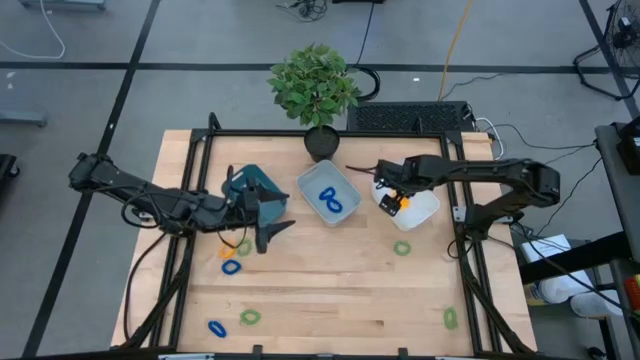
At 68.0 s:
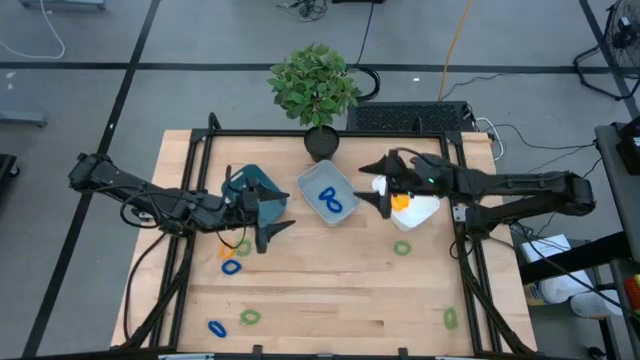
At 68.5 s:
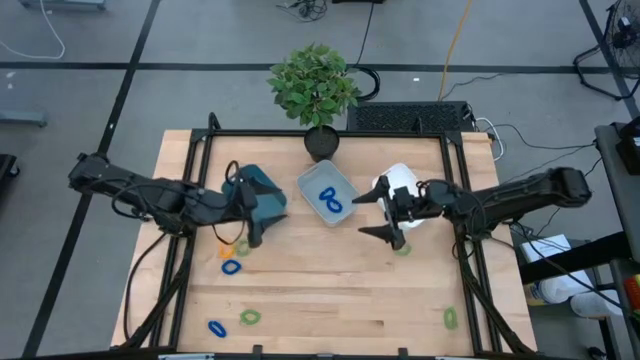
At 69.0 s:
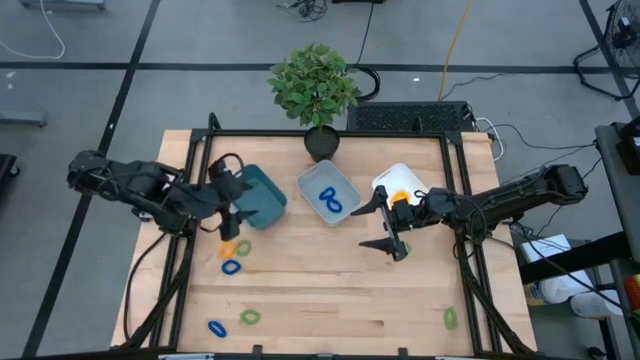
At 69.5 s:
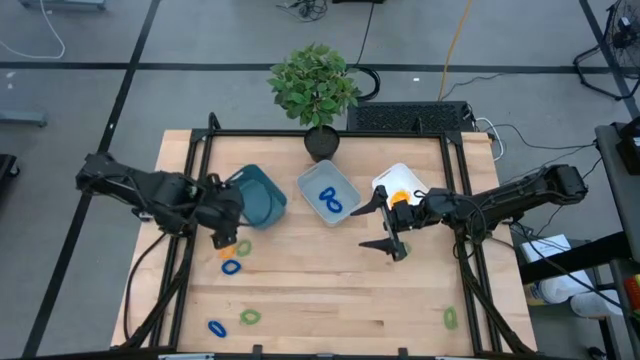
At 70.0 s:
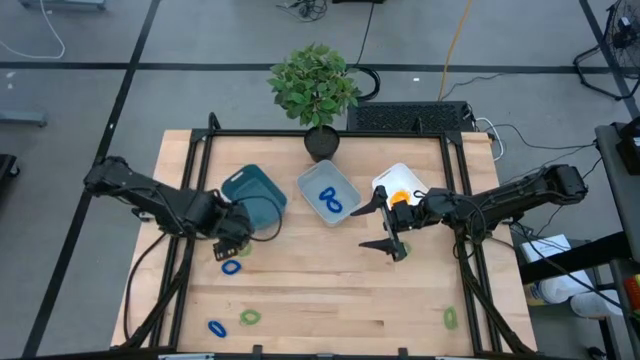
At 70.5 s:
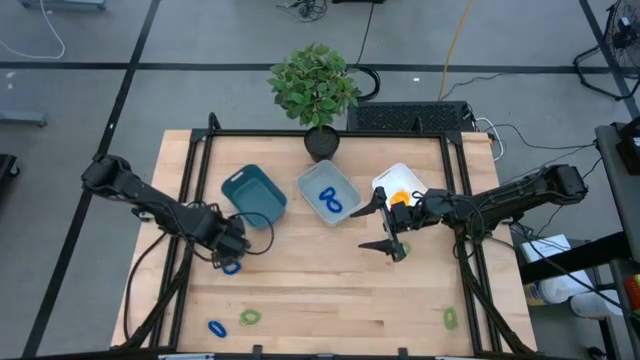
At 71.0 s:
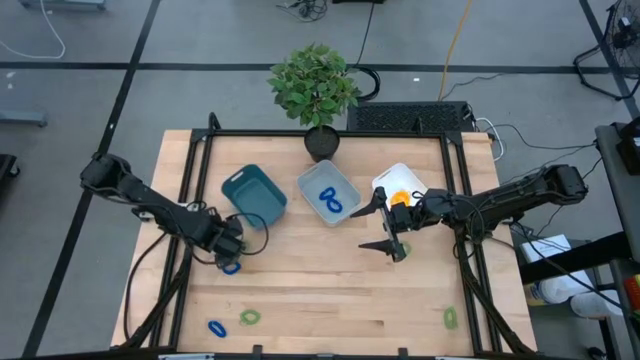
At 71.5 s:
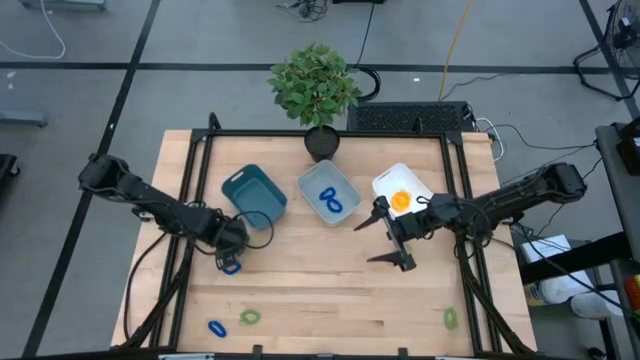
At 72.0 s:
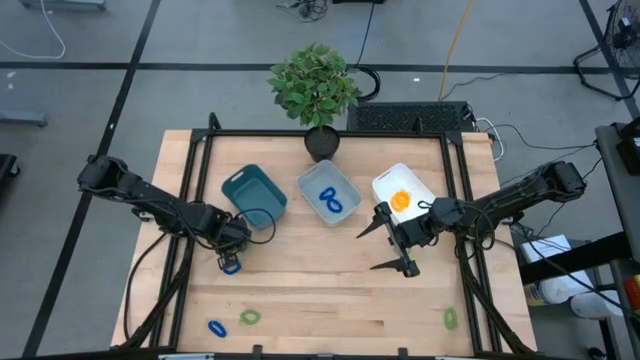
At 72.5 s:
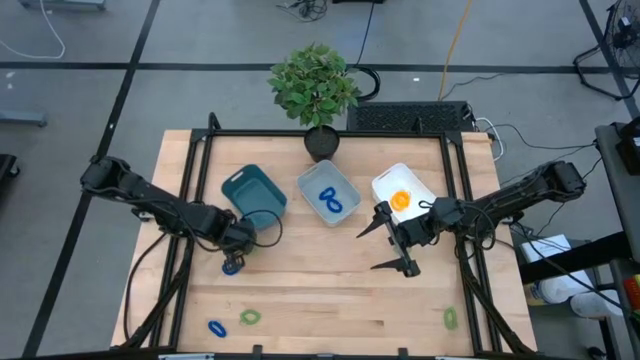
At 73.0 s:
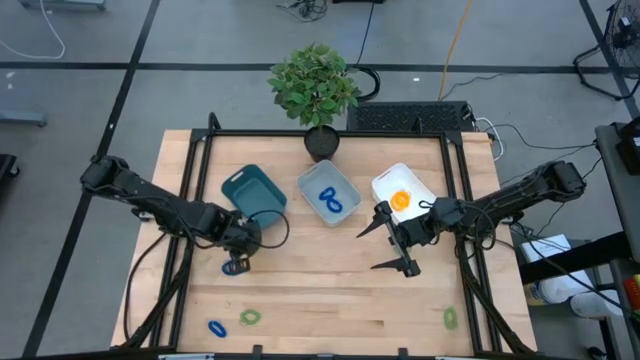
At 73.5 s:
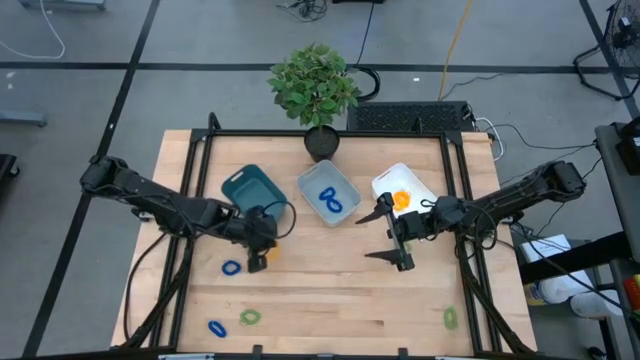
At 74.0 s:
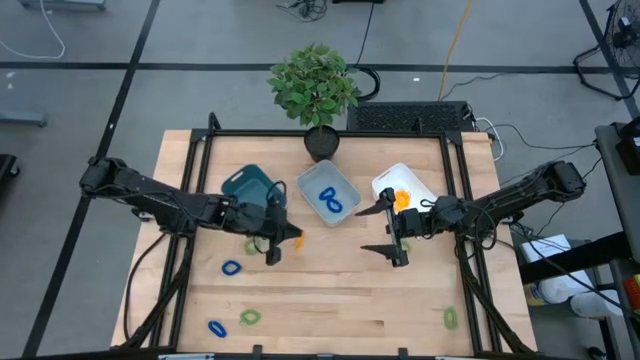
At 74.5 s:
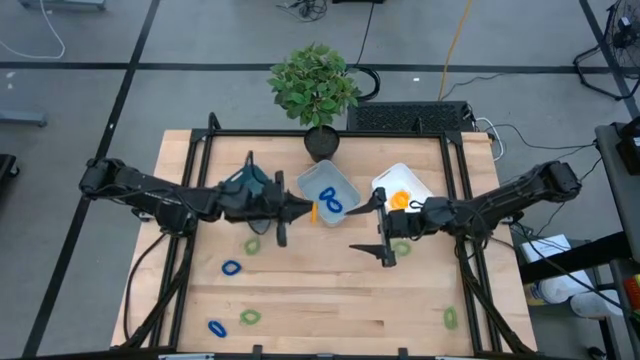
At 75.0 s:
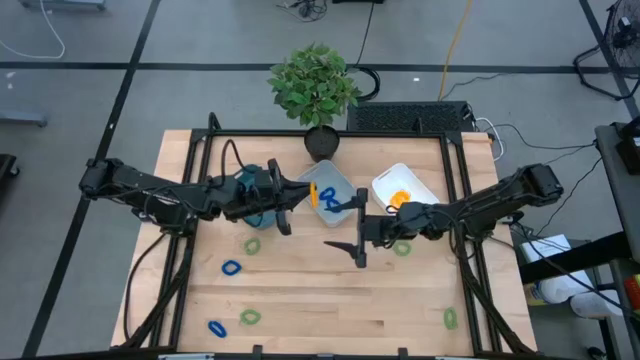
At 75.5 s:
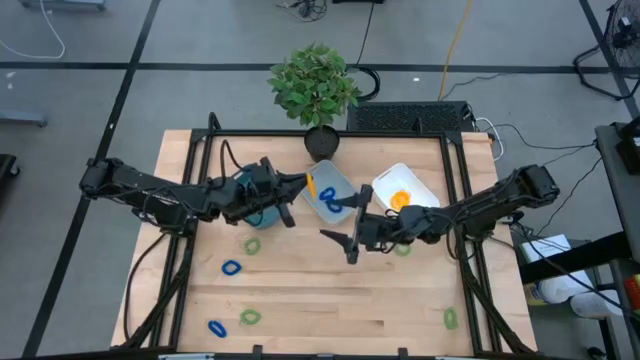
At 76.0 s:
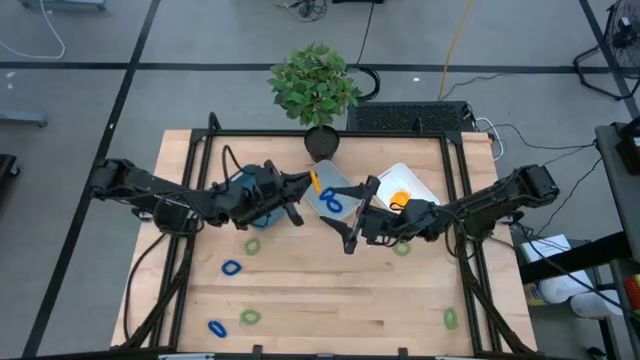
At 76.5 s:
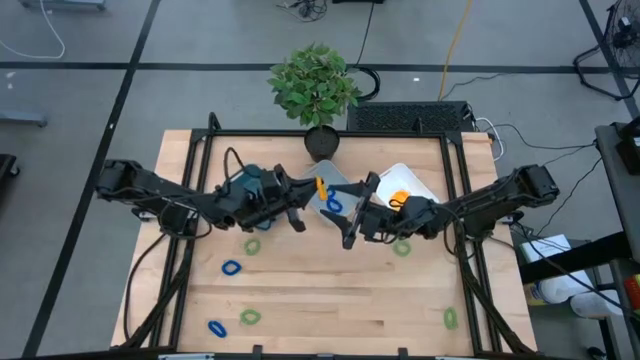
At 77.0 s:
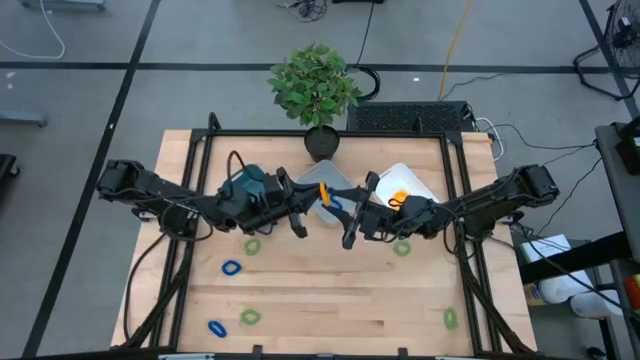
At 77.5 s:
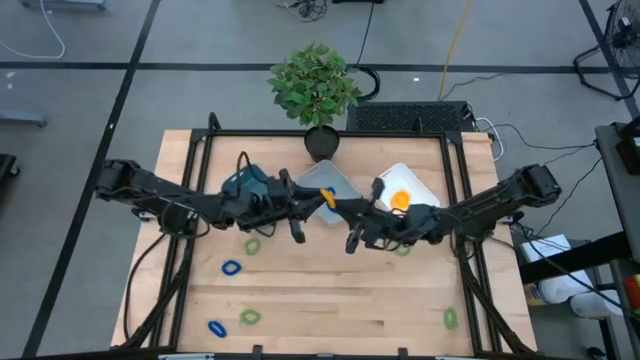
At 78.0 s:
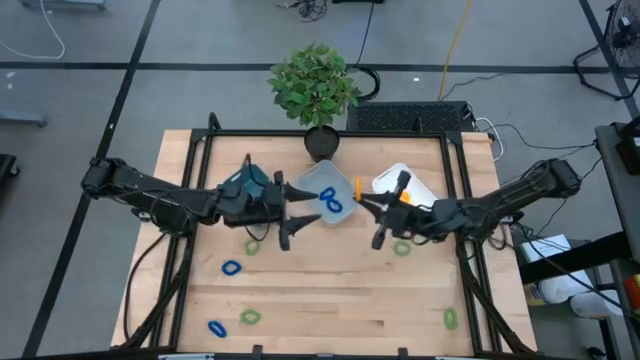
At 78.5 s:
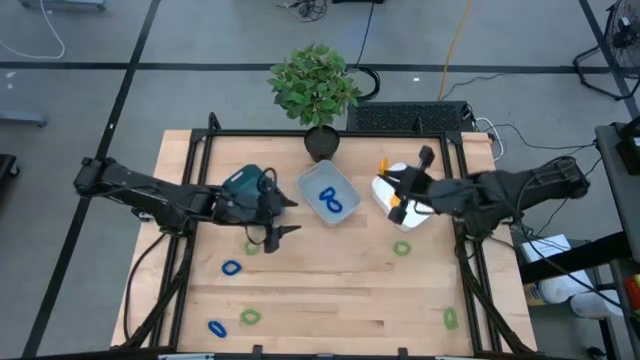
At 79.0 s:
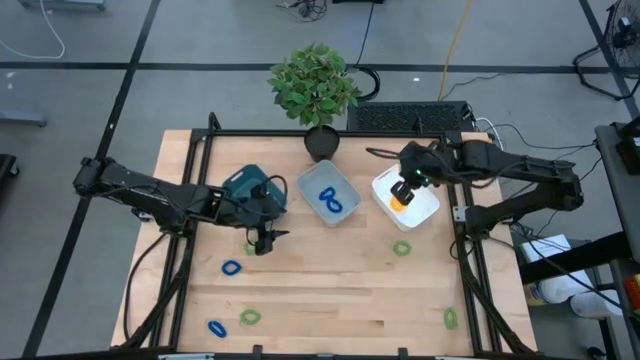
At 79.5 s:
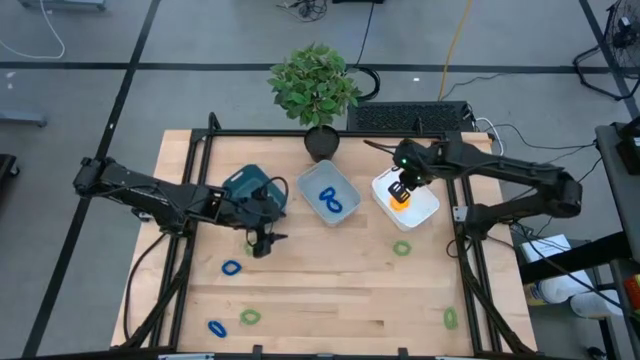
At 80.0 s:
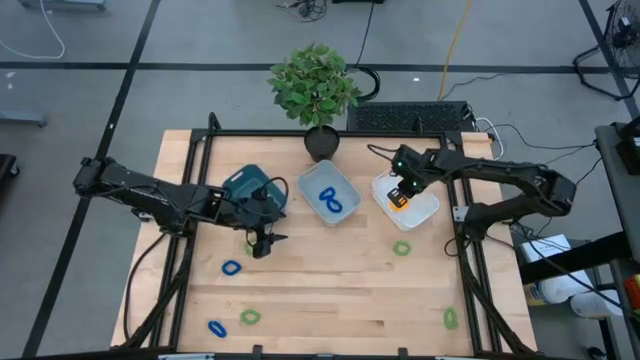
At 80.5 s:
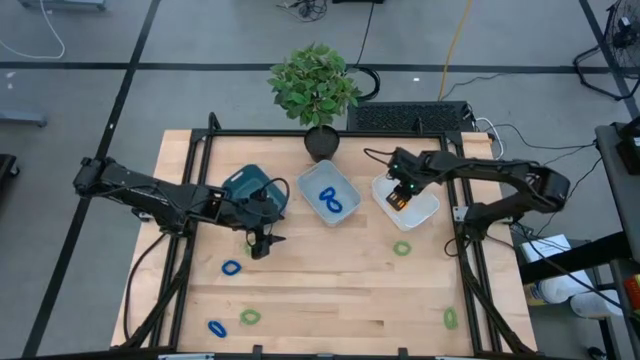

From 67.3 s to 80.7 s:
Task: Sort spring keychains
Put the yellow spring keychain into the white bin

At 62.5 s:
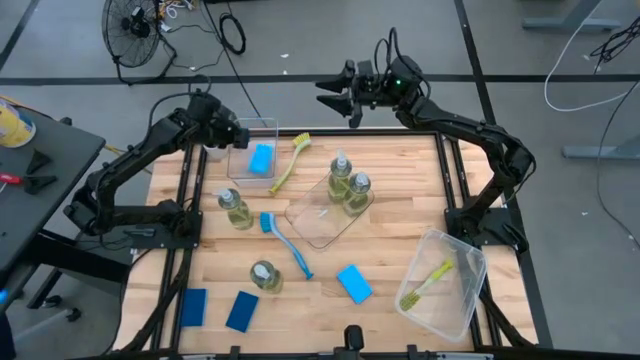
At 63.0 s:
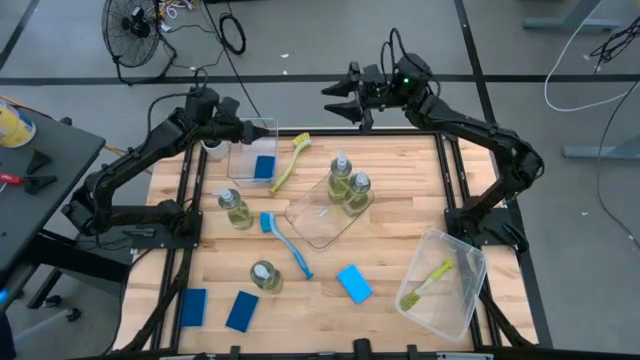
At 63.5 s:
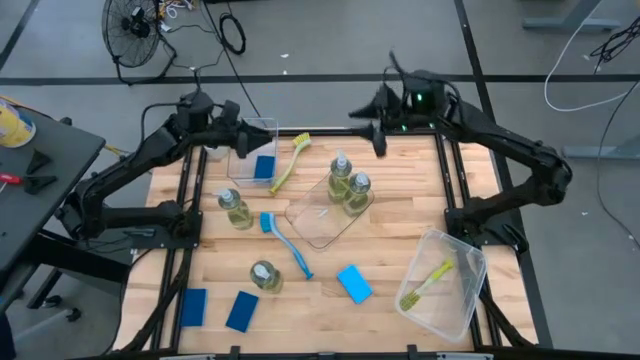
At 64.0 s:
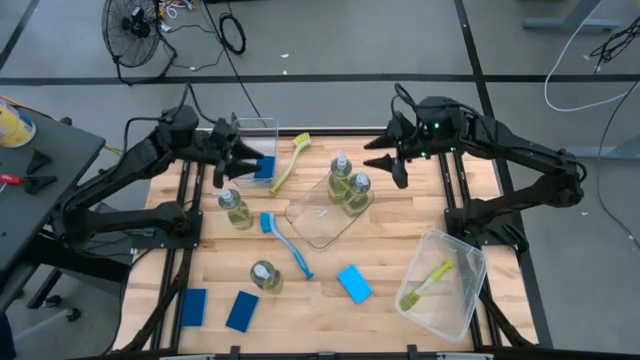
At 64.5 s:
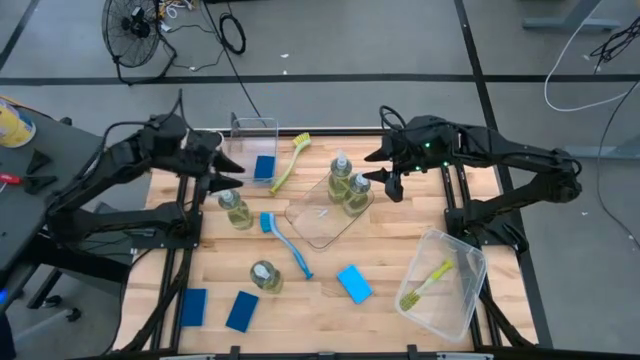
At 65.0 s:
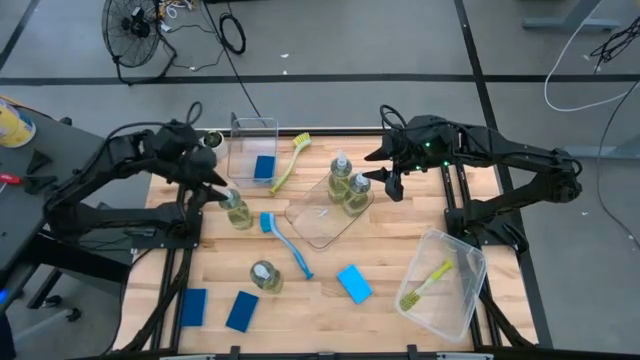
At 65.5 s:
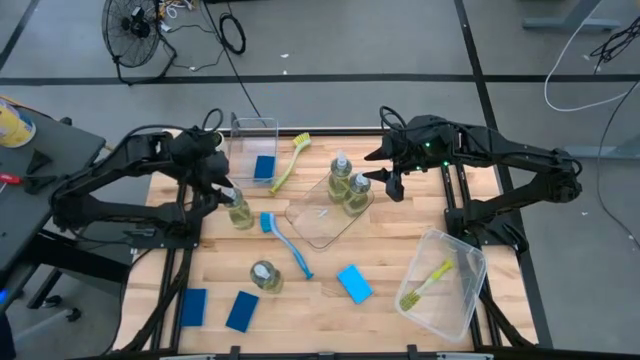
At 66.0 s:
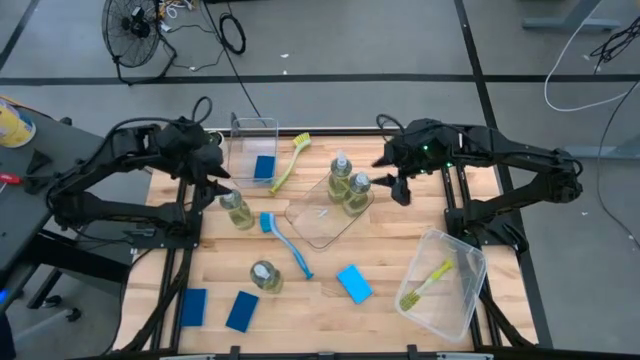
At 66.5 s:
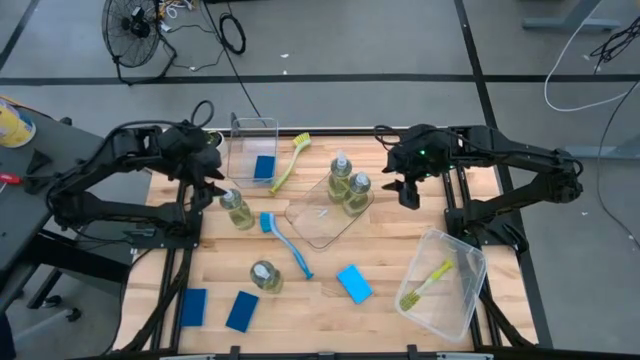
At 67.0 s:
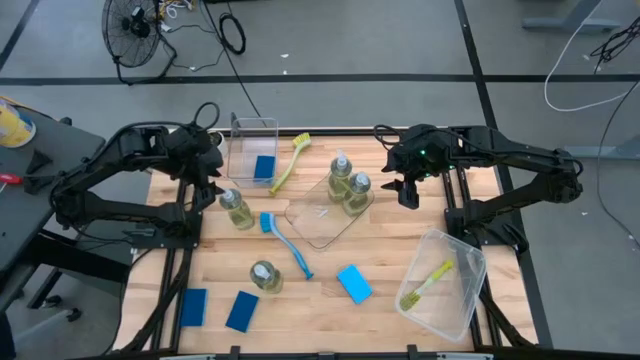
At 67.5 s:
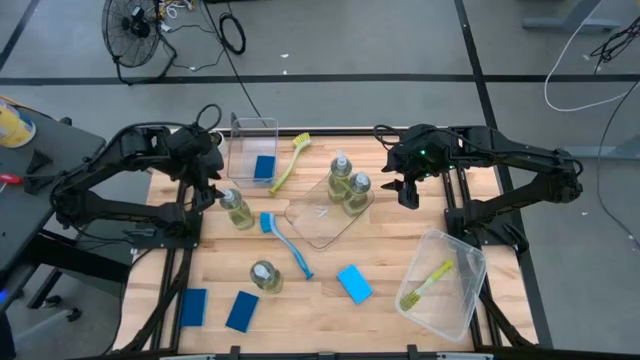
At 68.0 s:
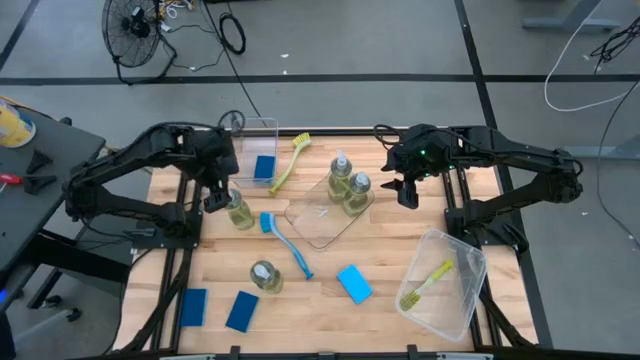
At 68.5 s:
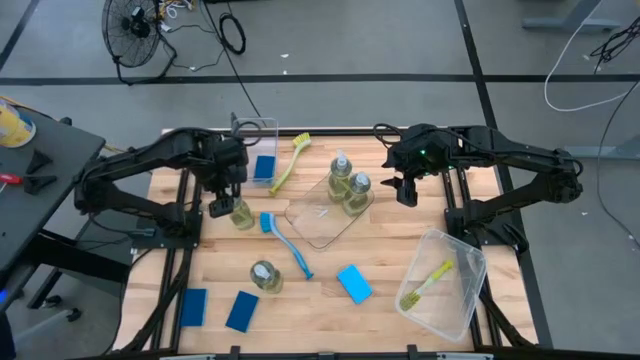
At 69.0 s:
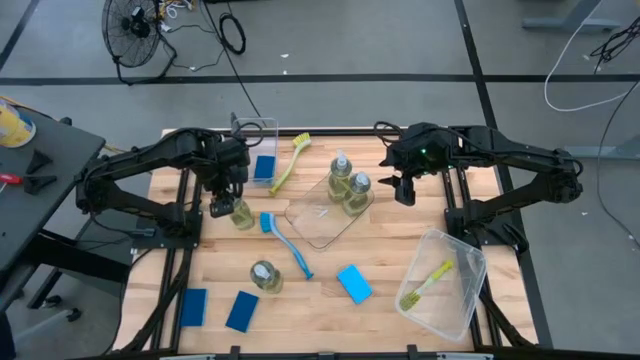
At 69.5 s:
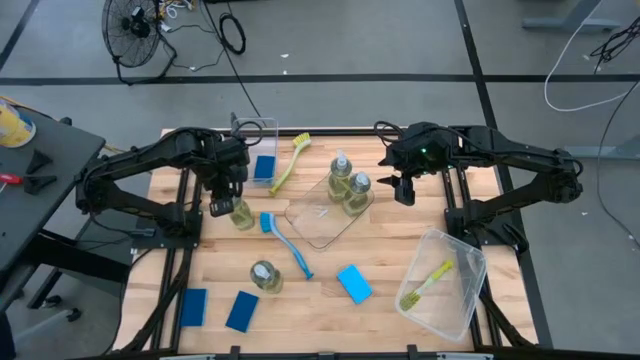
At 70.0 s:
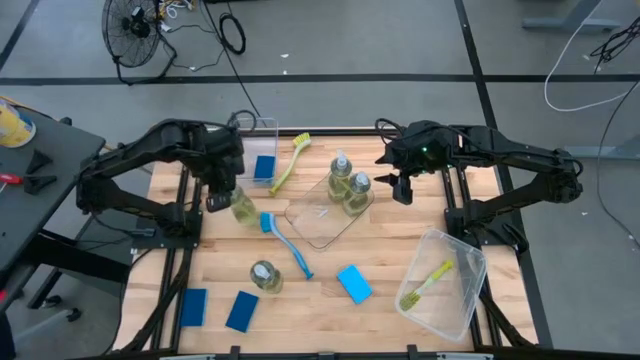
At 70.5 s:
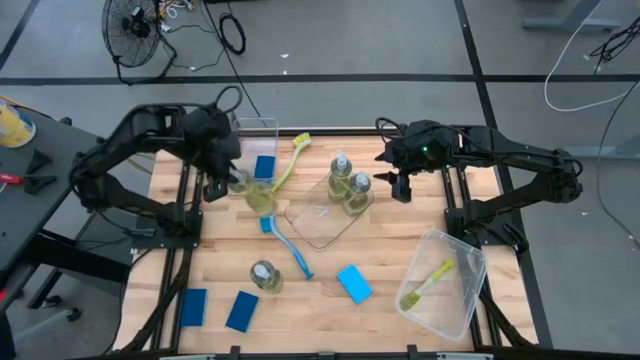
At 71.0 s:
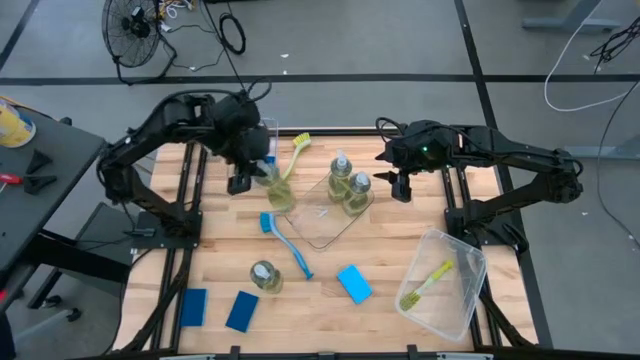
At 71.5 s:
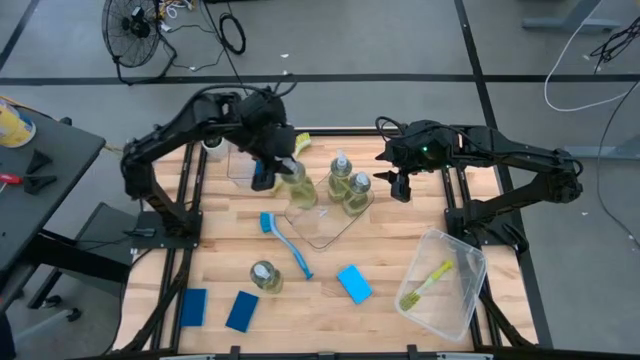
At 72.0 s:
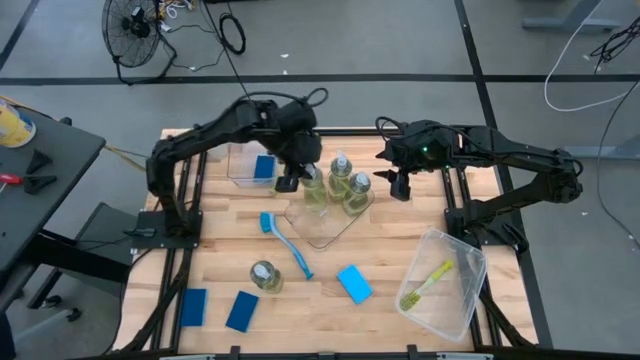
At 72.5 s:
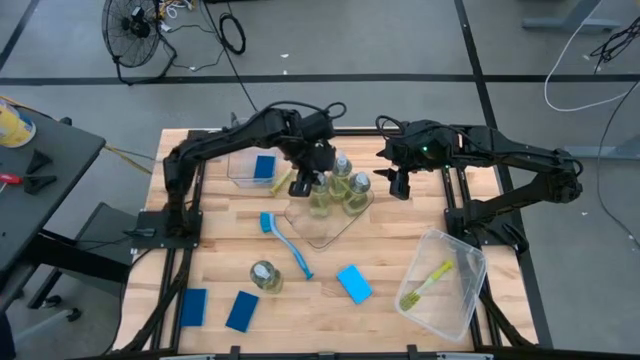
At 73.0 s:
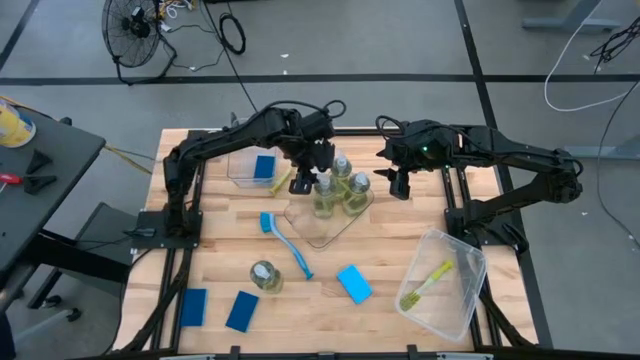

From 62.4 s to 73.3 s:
Task: Pick & Place Kitchen Sink Supplies
Put the dishwashing liquid bottle into the bottom transparent bin
